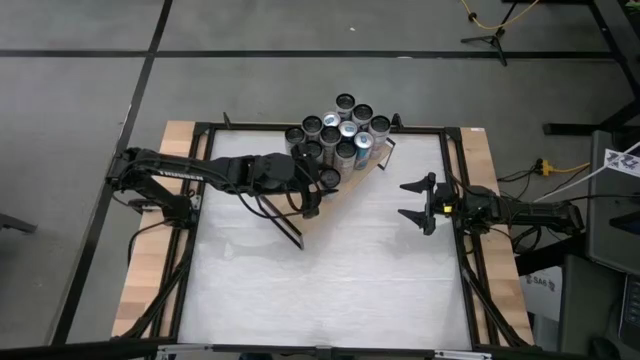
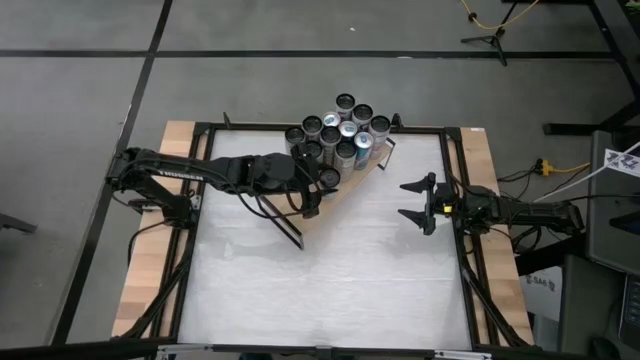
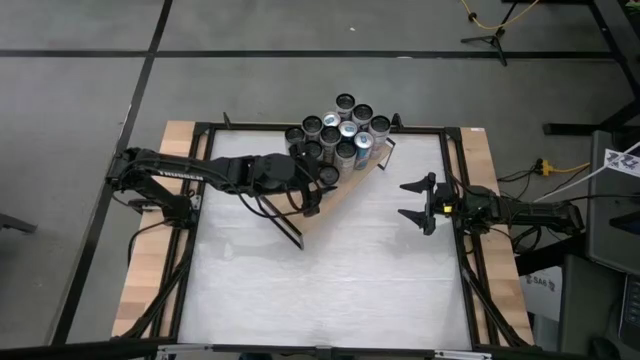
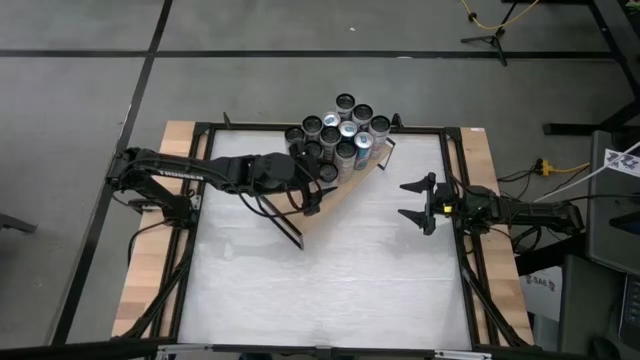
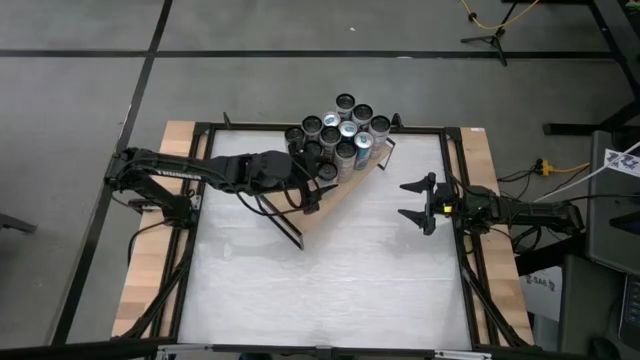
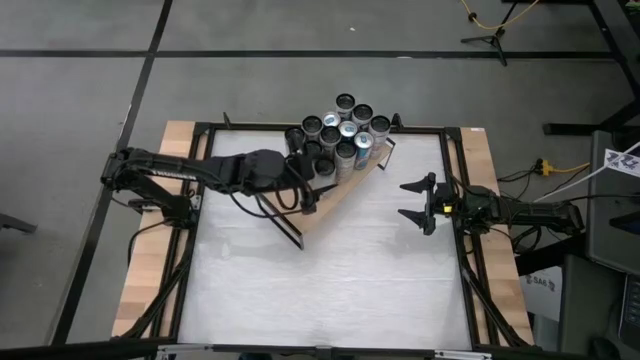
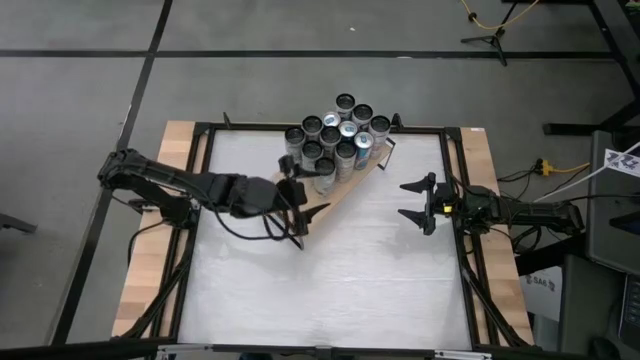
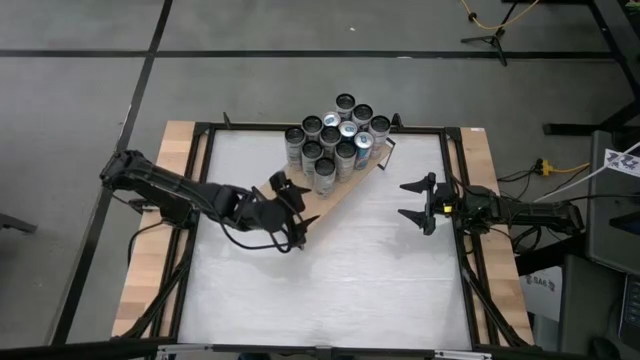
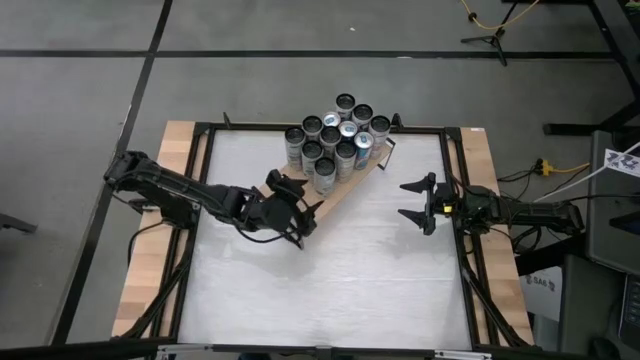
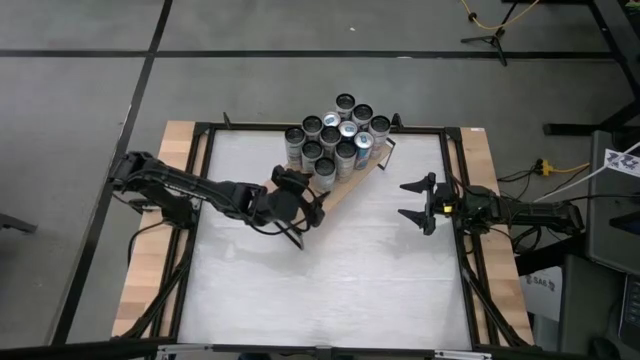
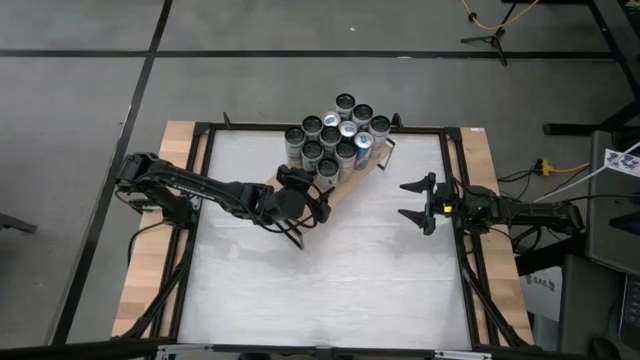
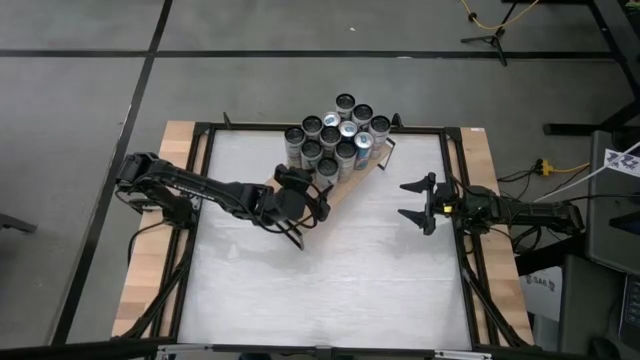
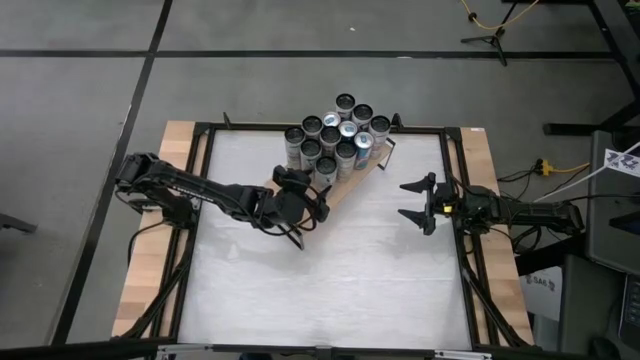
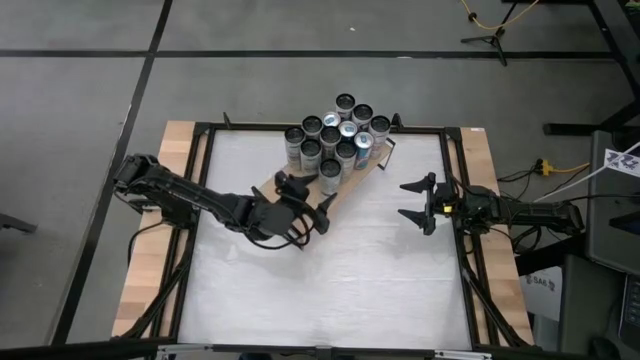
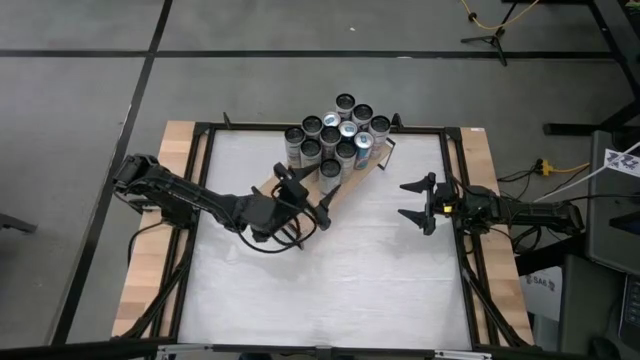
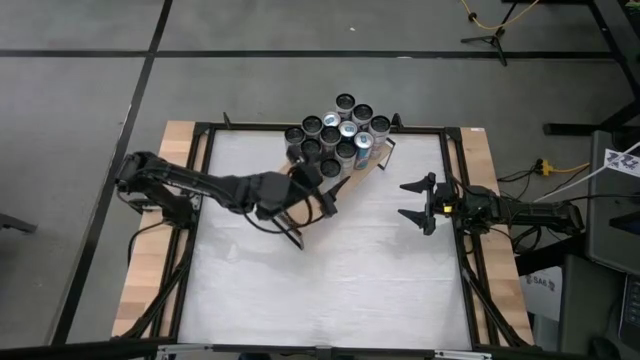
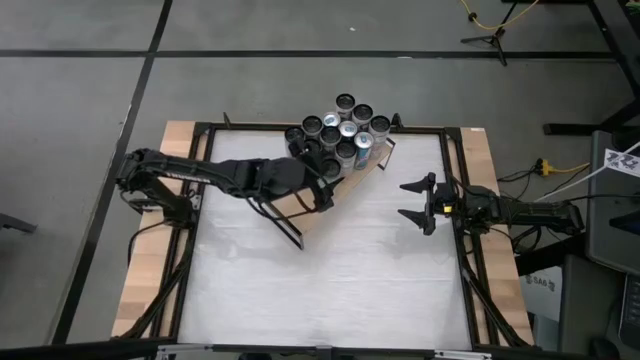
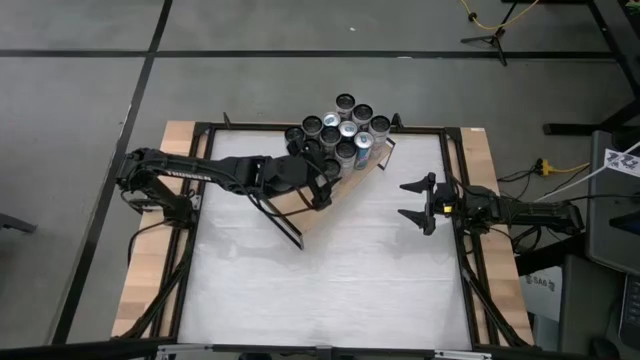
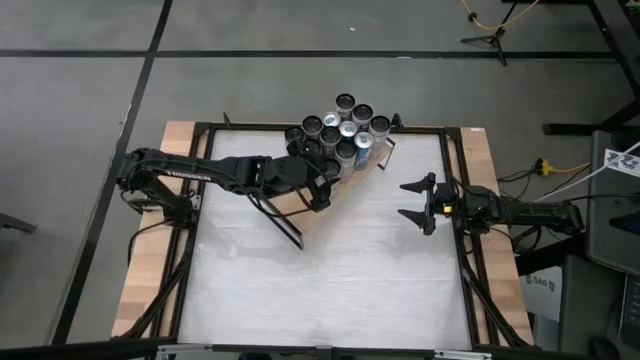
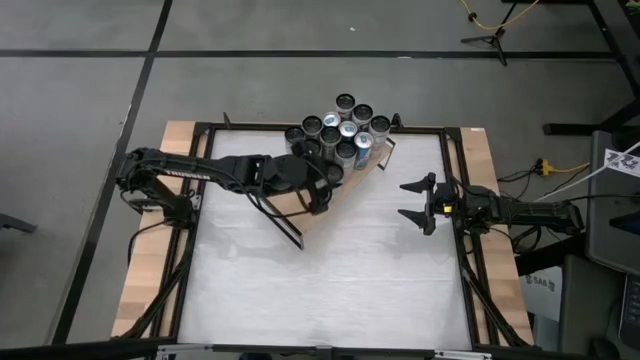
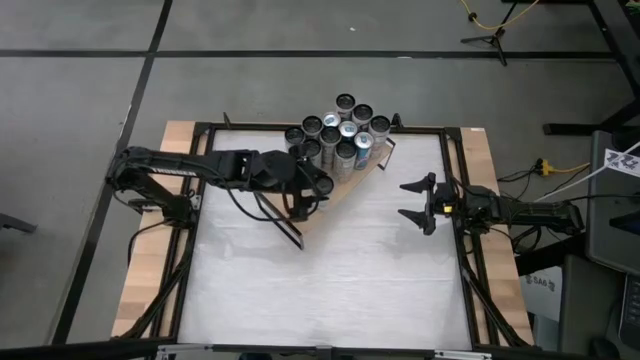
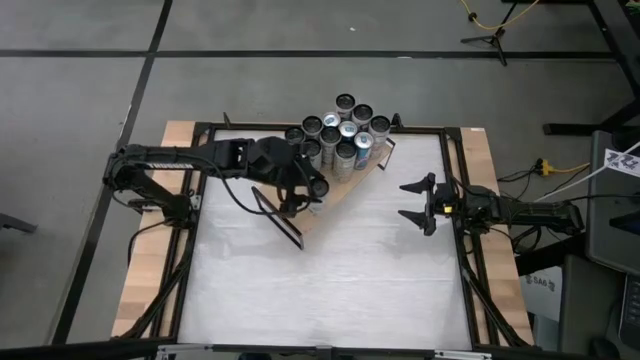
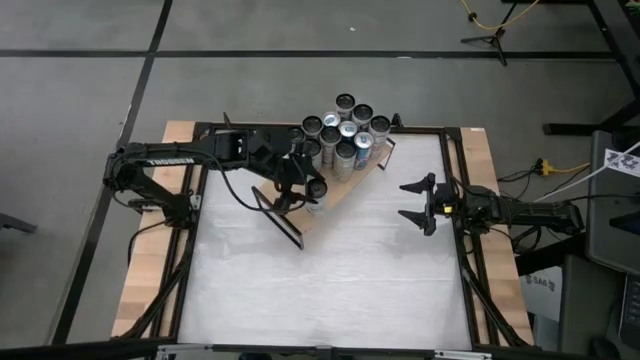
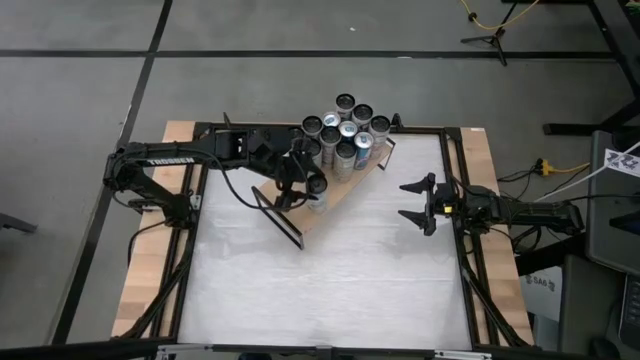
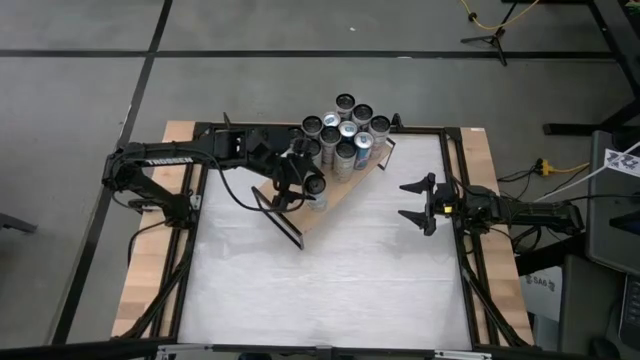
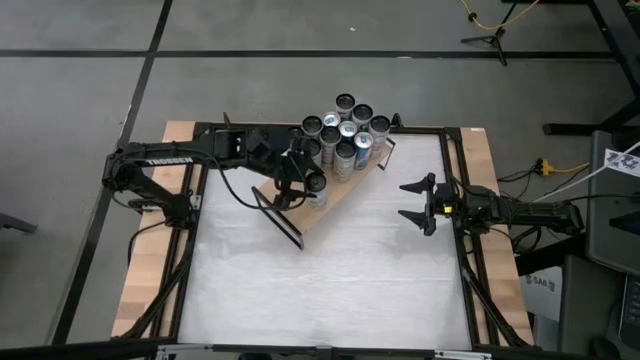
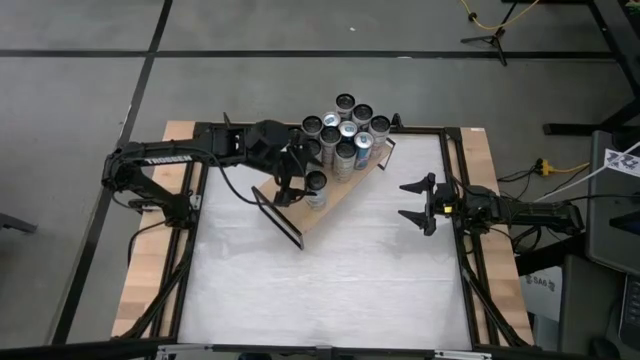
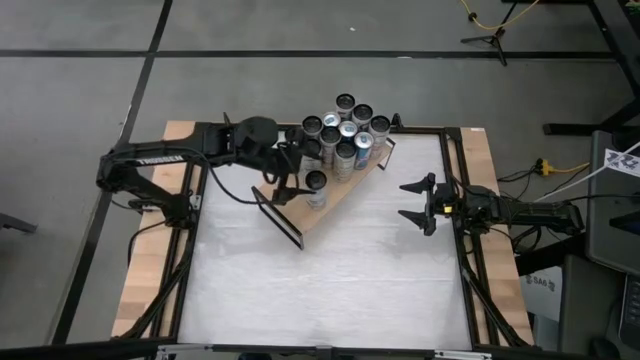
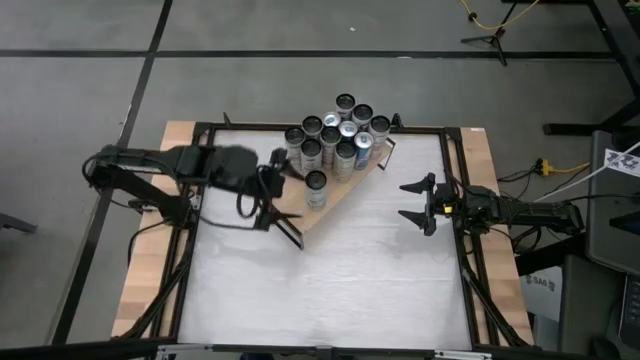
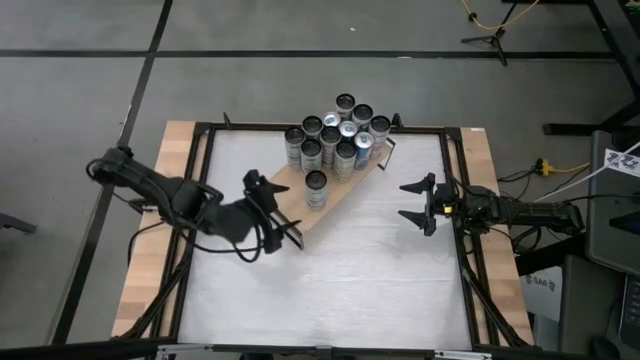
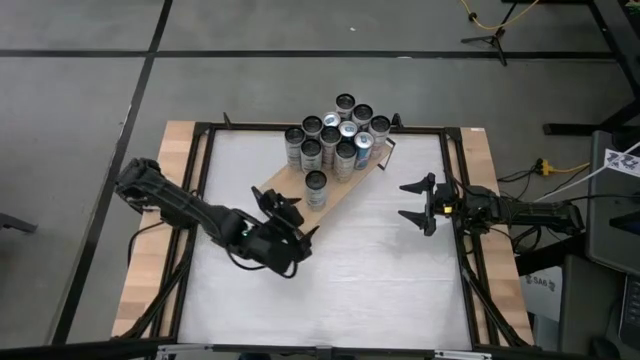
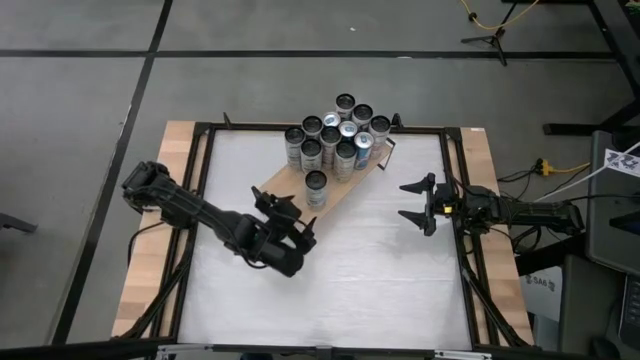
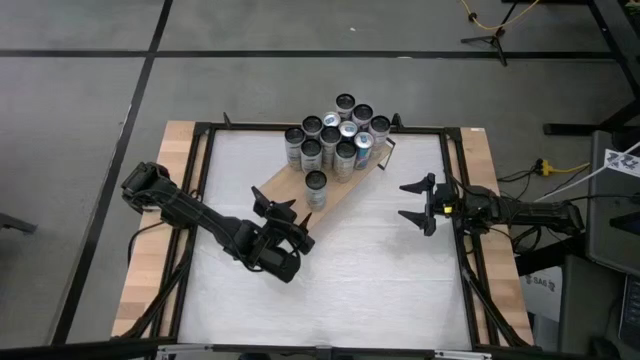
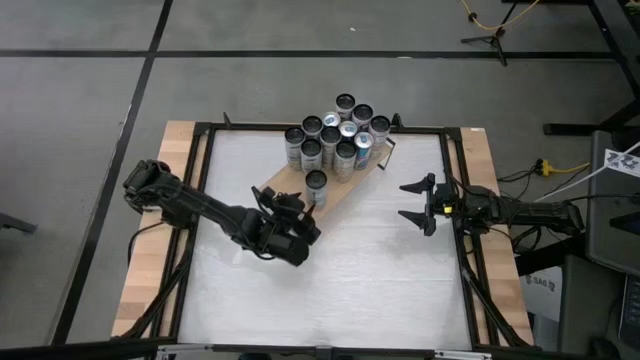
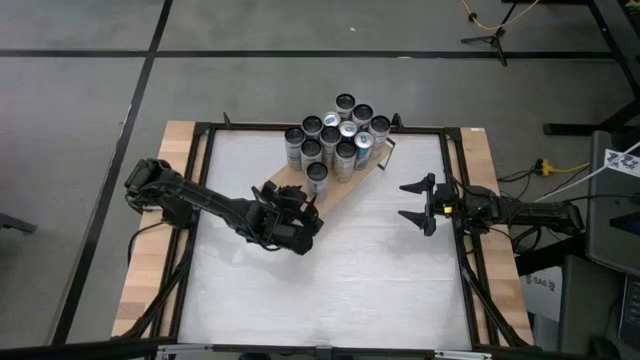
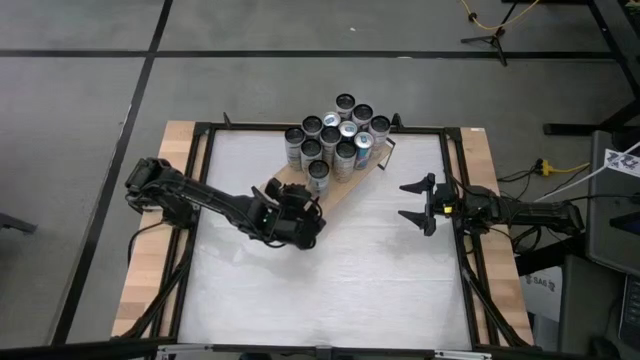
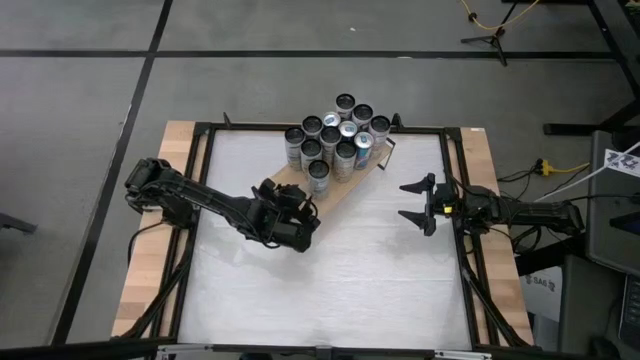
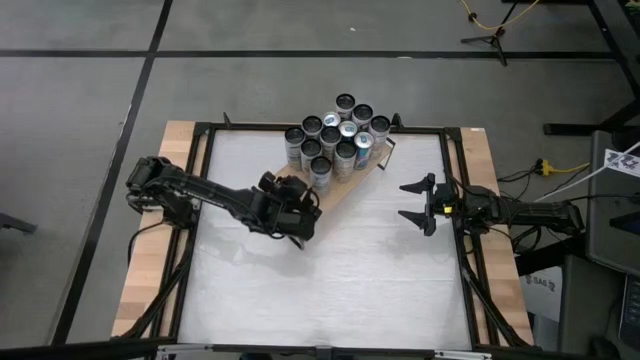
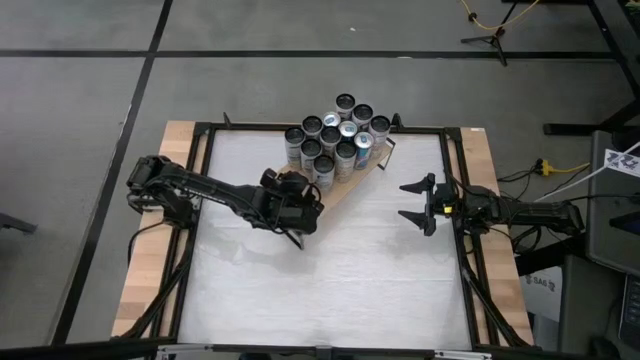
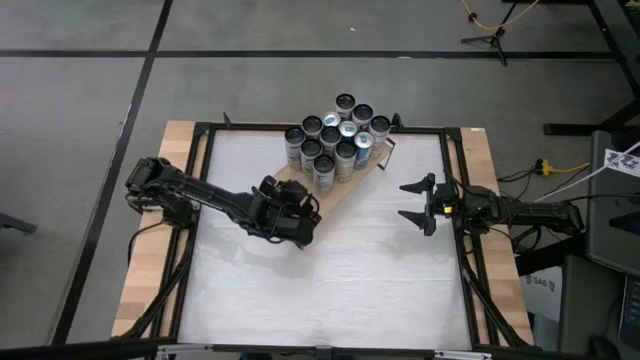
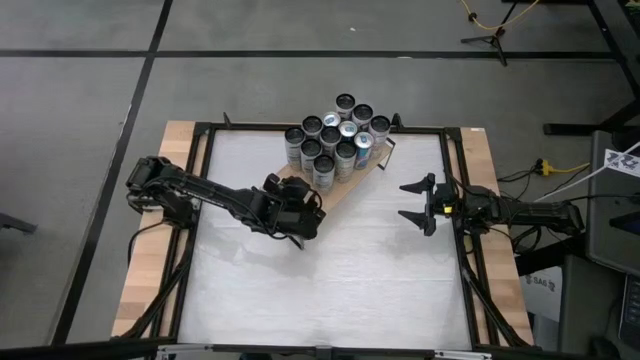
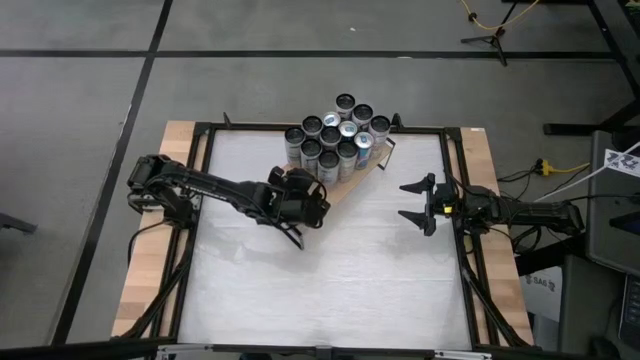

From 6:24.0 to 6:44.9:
Task: Place canned beverage on shelf
Put the white-blue soda can on the shelf aligned with the other white-blue soda cans
